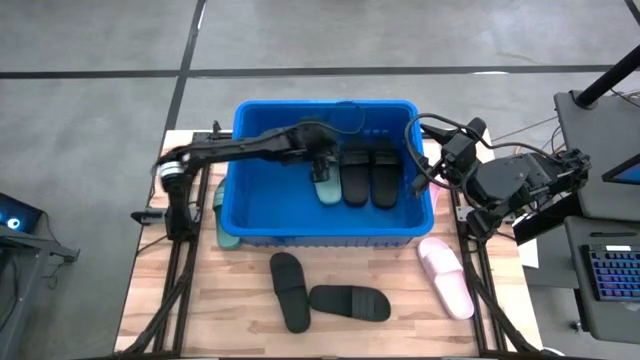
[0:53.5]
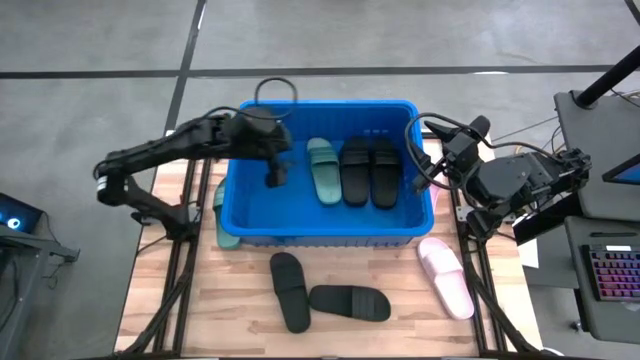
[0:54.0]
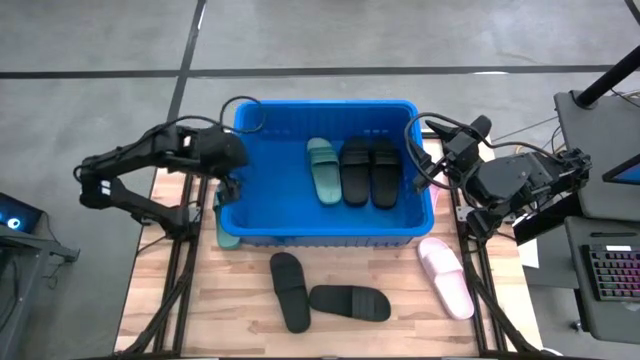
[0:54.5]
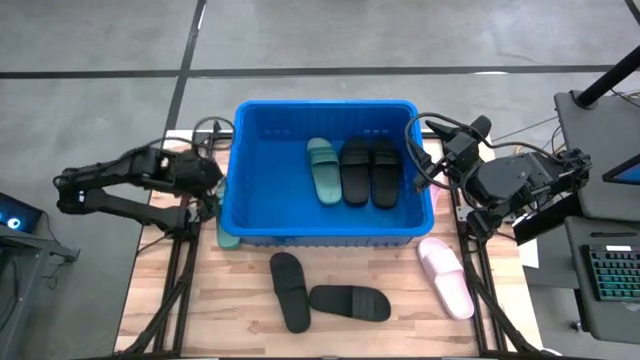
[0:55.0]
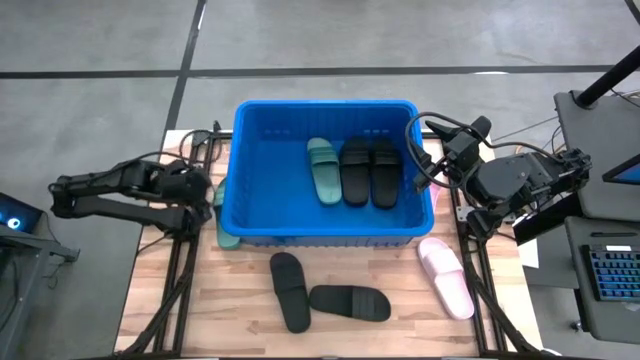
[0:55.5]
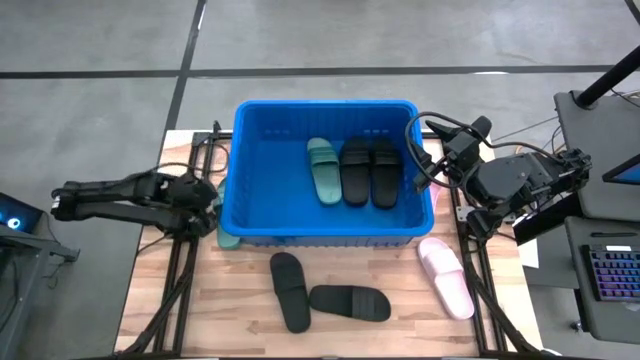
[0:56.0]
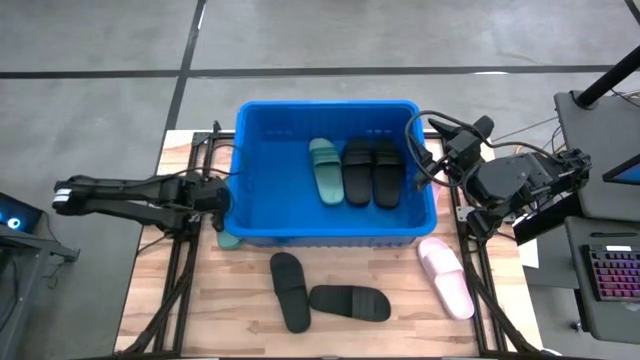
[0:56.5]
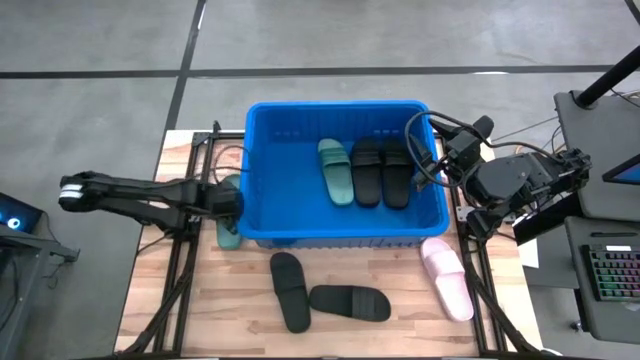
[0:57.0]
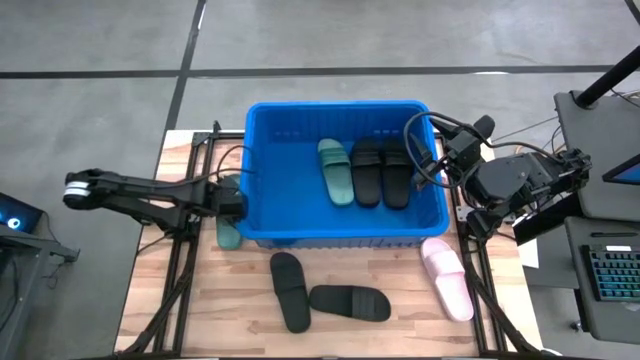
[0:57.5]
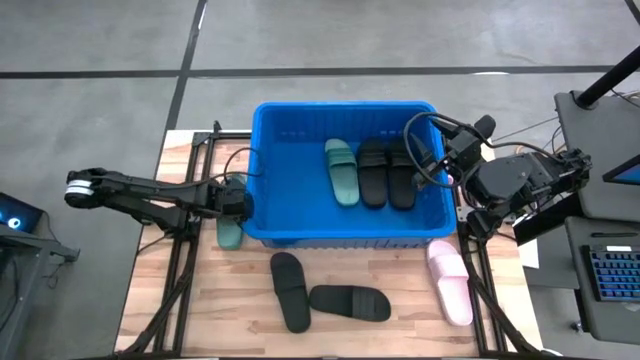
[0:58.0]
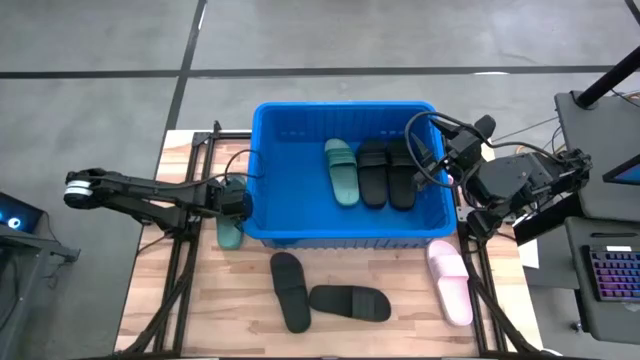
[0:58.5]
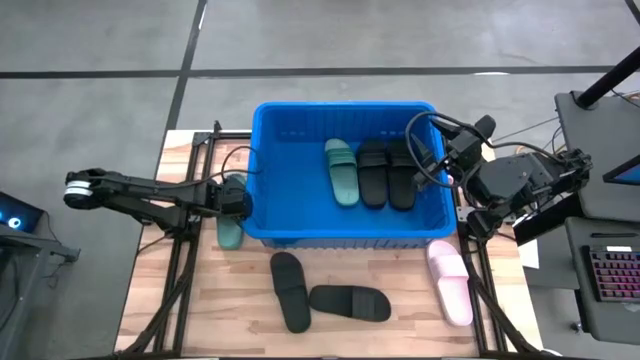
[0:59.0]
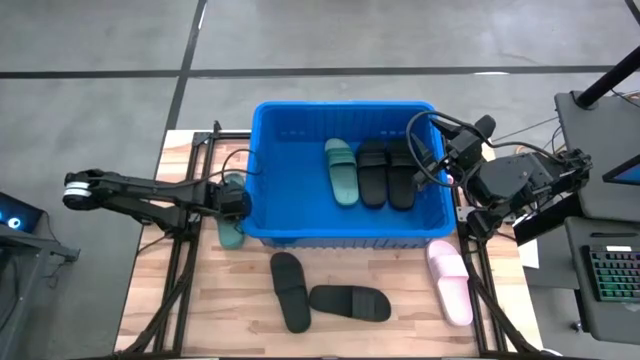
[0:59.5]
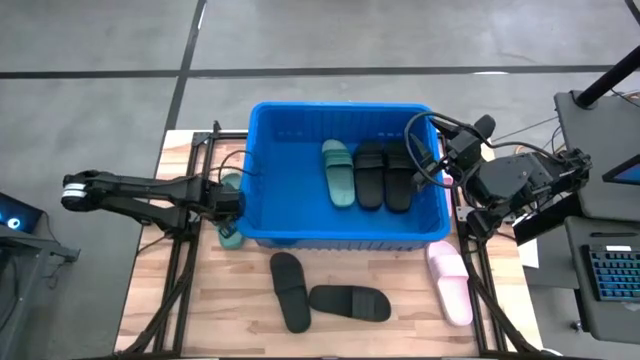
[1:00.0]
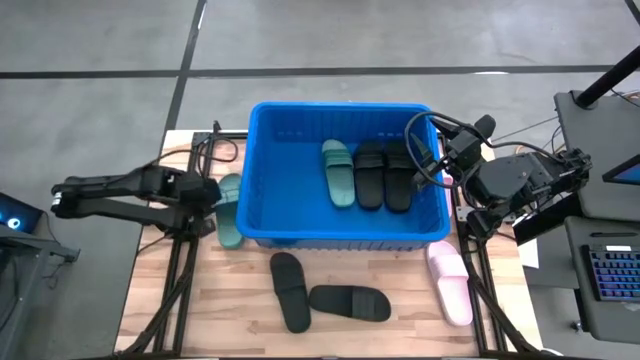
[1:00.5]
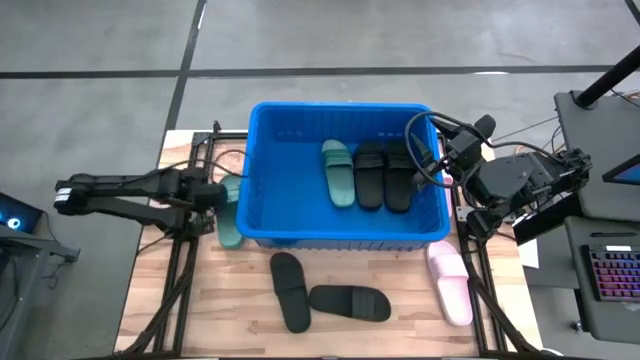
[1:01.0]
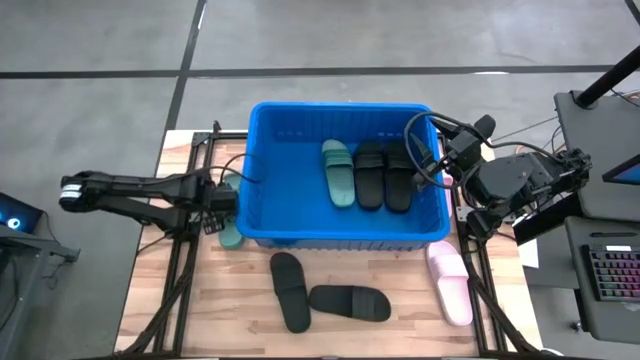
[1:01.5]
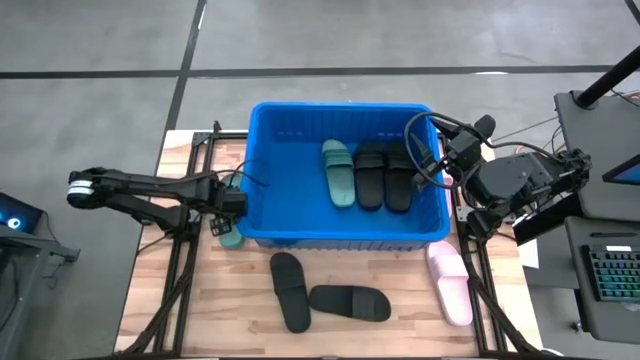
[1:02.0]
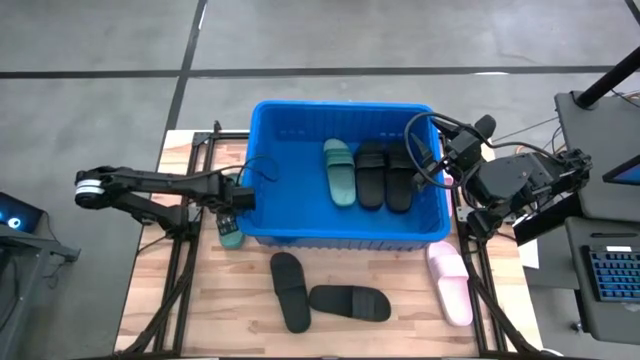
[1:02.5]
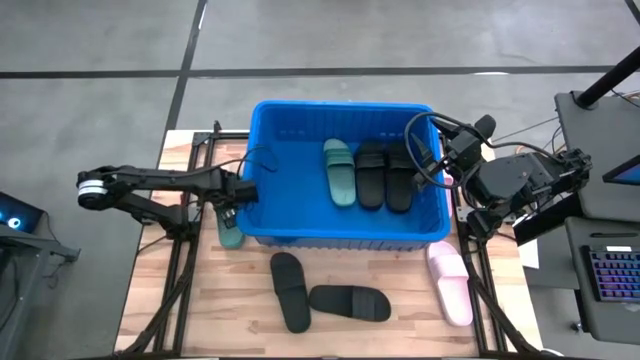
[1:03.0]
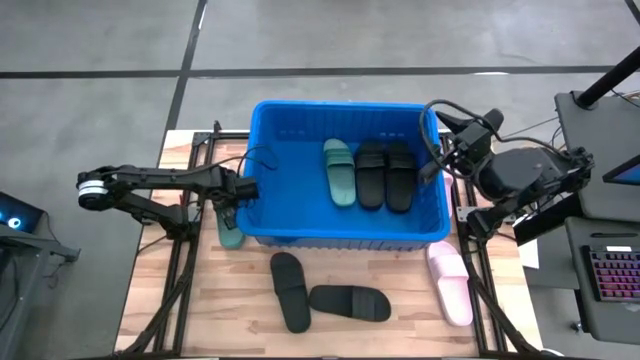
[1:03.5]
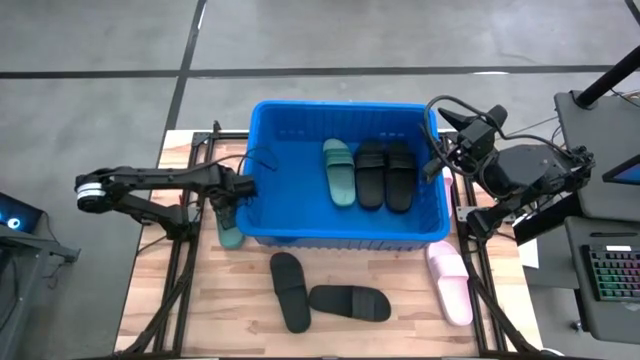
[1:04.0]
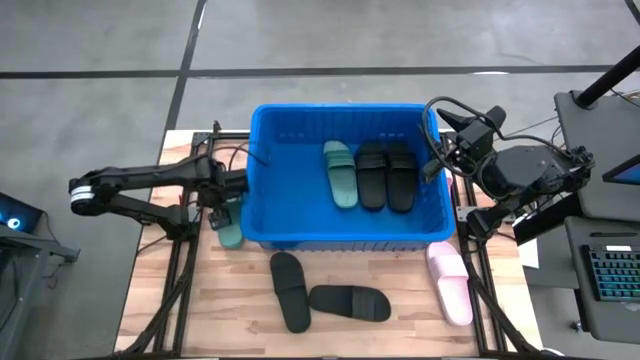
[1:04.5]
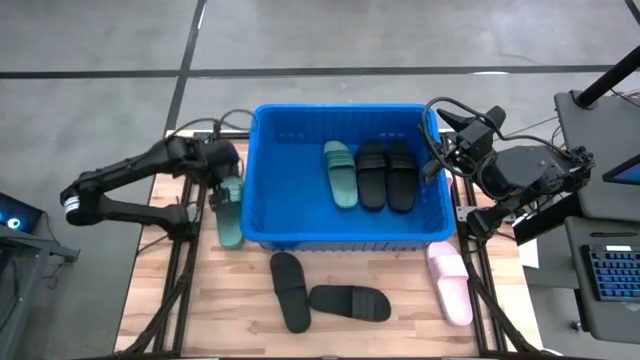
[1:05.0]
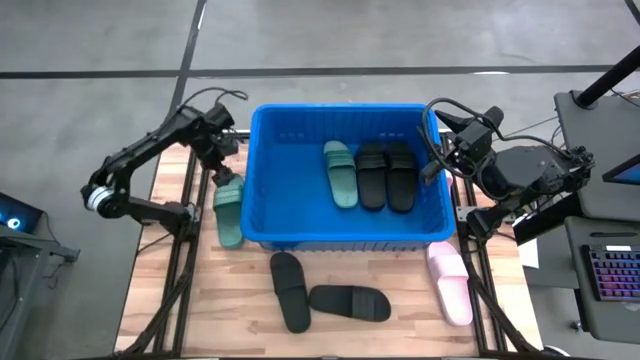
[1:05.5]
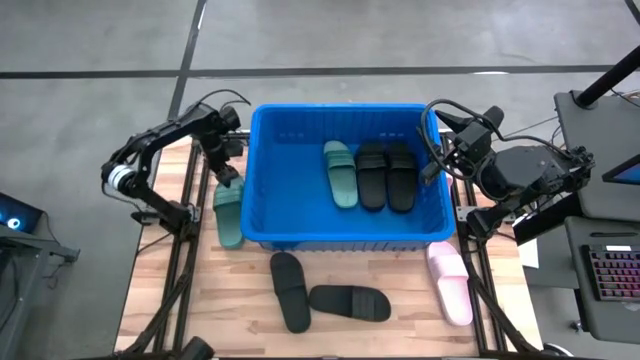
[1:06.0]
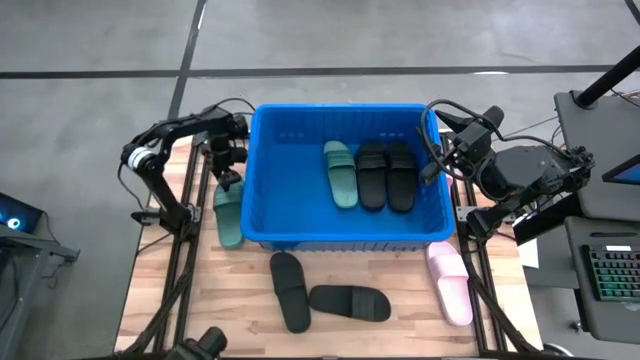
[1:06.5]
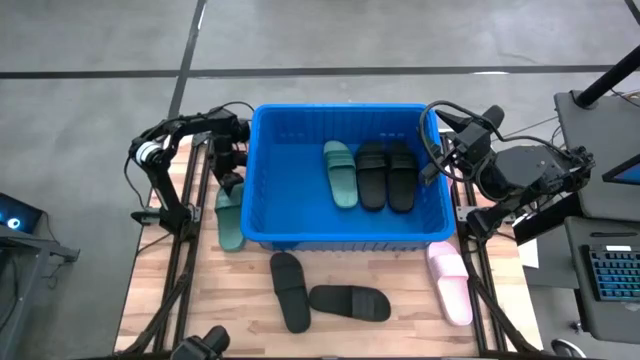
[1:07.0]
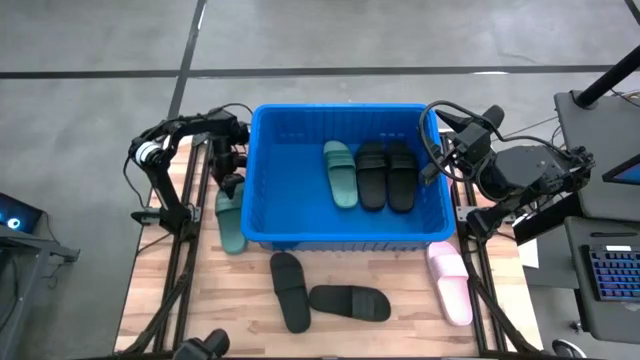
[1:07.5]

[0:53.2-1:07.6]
Task: Pick and place slides into bin
Put the green slide into the blue container

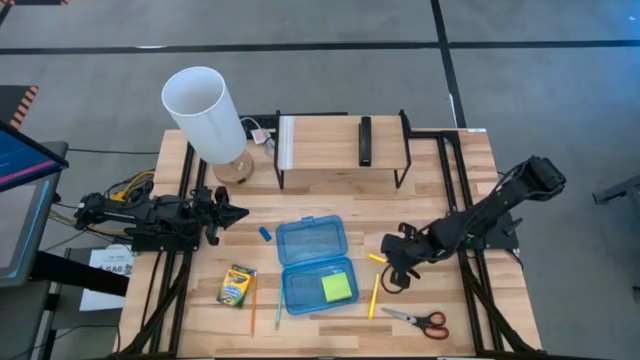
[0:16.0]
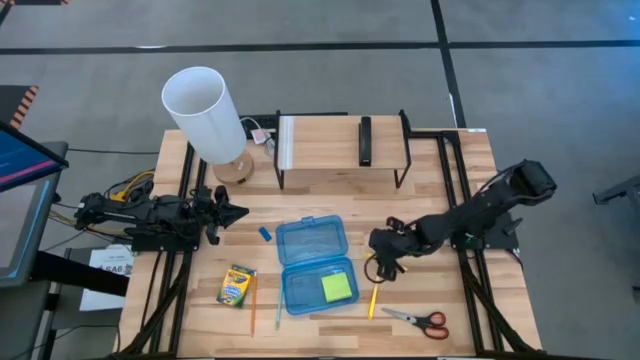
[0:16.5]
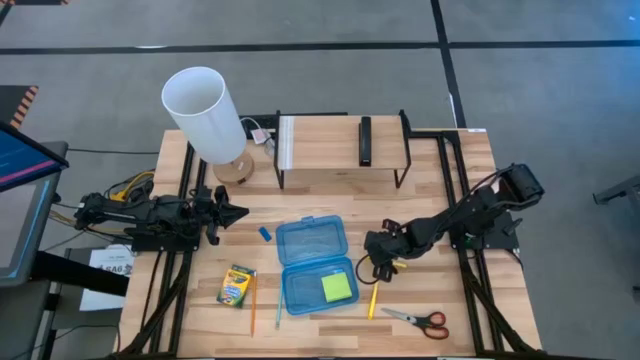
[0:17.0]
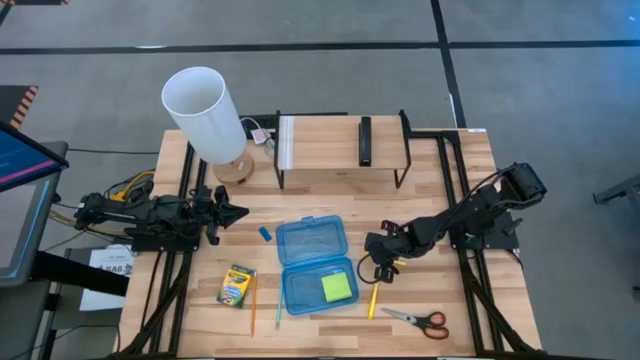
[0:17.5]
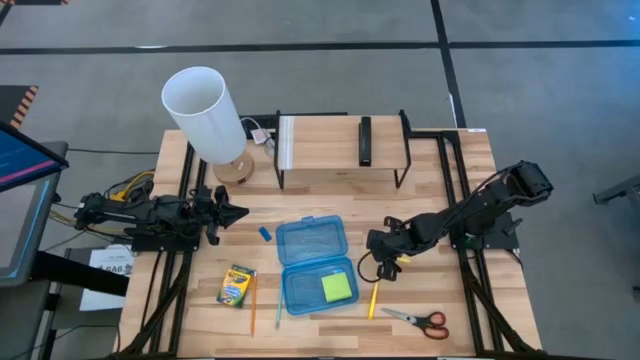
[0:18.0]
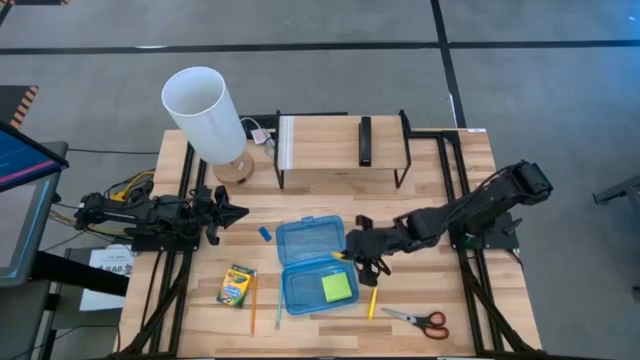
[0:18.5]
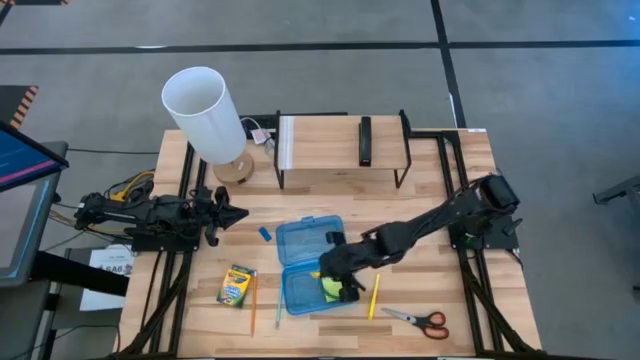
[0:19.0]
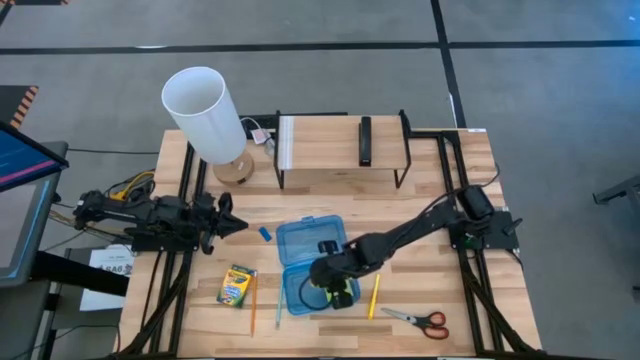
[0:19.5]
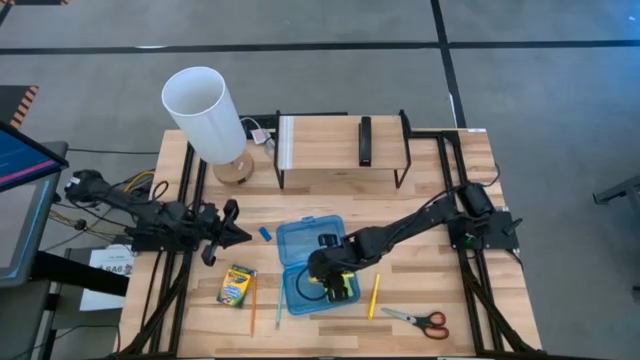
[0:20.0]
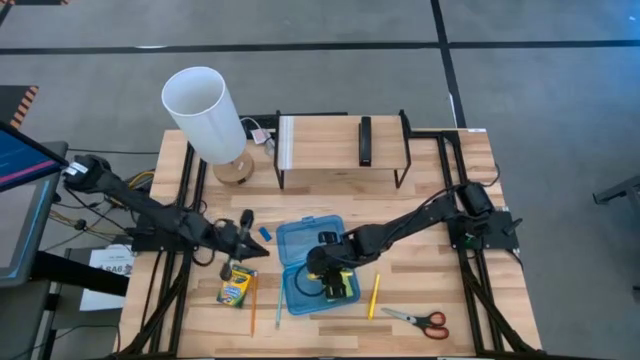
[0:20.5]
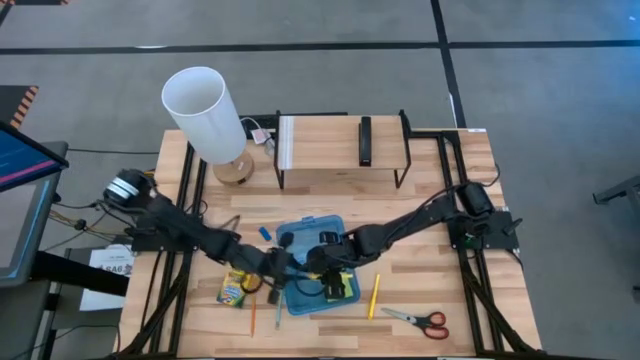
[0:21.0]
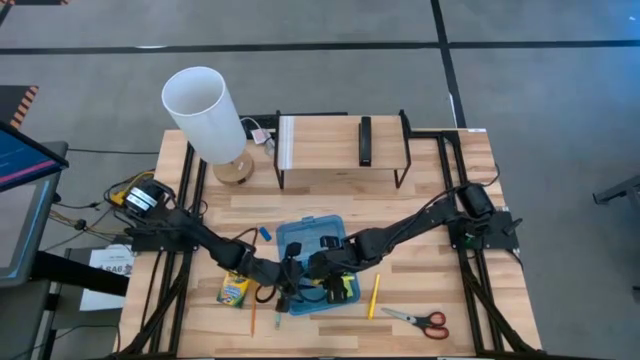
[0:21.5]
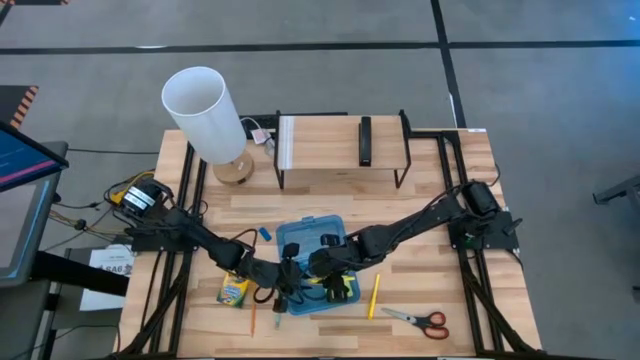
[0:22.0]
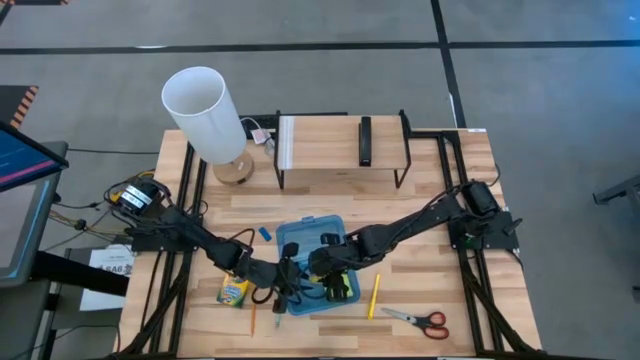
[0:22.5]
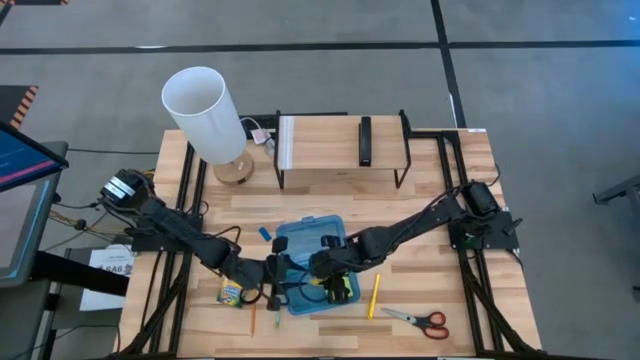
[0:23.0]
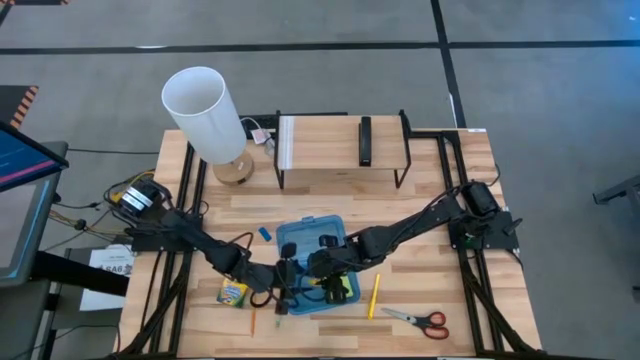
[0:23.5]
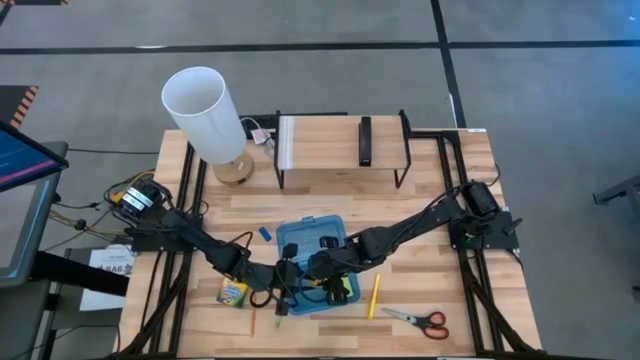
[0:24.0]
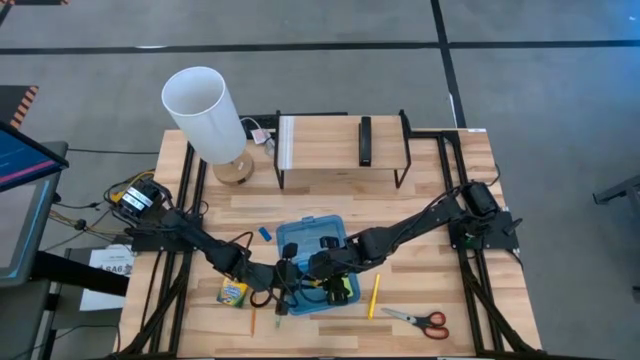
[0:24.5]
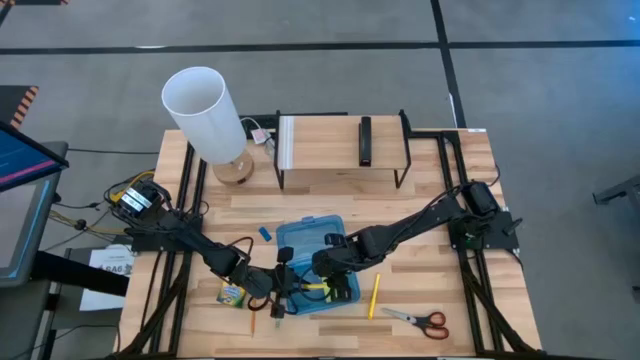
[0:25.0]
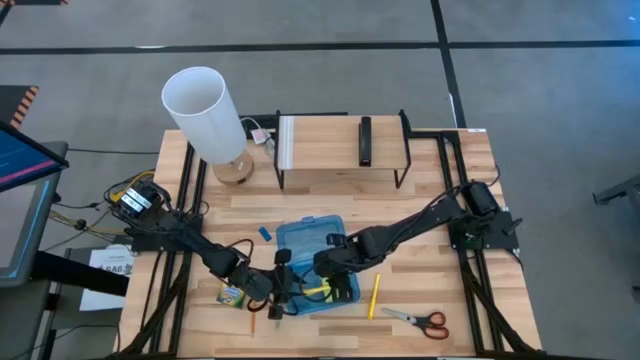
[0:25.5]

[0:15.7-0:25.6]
Task: Pack school essentials
Put the top yellow pen into the blue supply box
